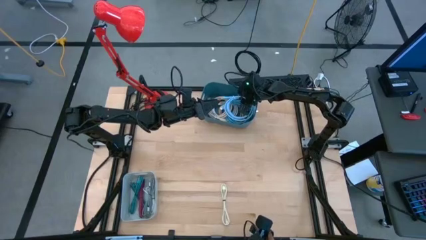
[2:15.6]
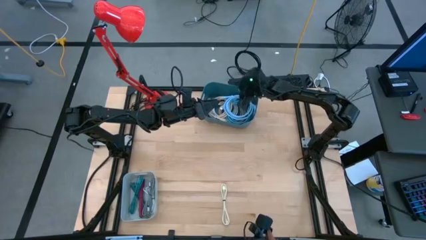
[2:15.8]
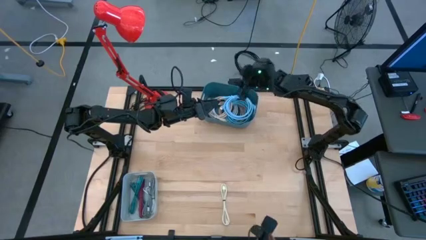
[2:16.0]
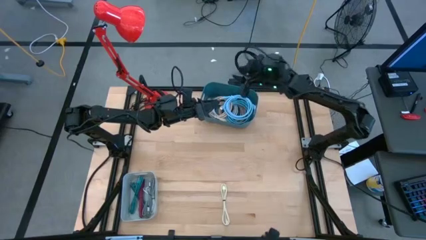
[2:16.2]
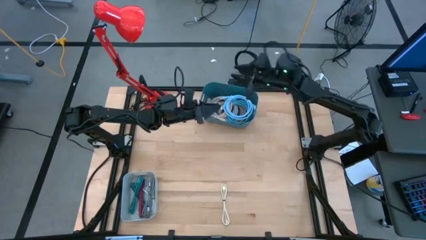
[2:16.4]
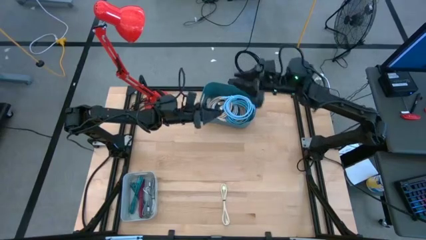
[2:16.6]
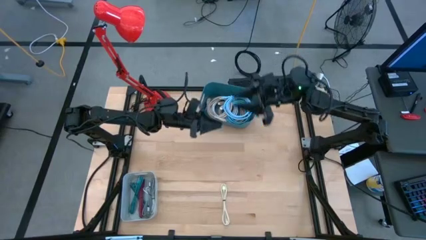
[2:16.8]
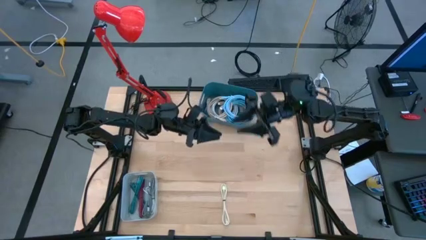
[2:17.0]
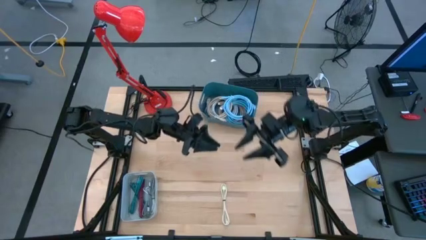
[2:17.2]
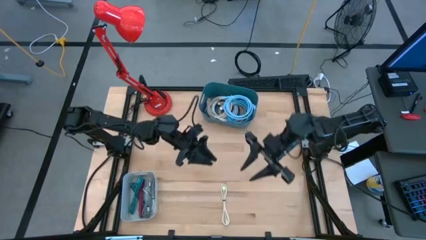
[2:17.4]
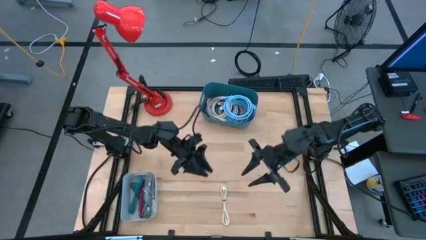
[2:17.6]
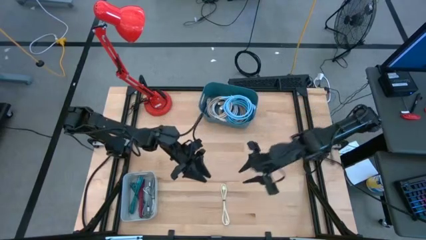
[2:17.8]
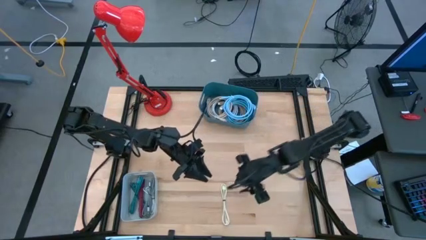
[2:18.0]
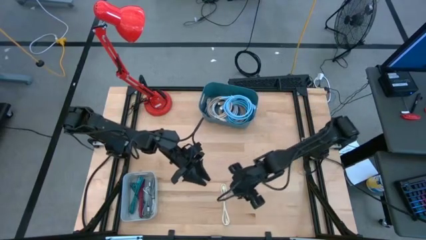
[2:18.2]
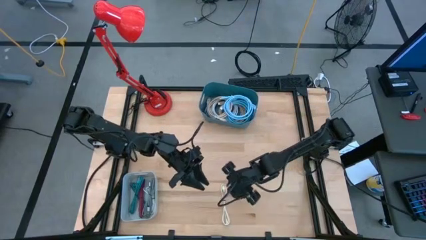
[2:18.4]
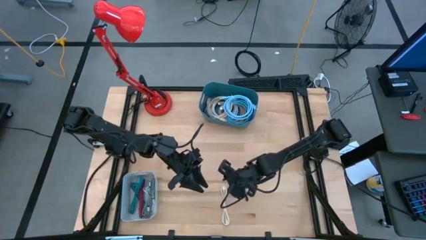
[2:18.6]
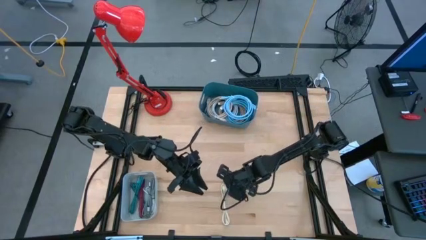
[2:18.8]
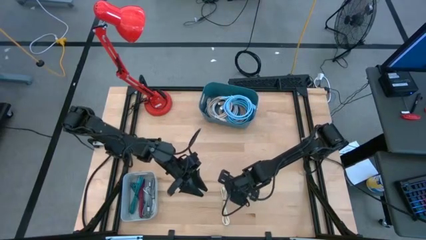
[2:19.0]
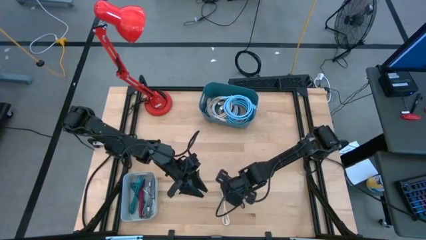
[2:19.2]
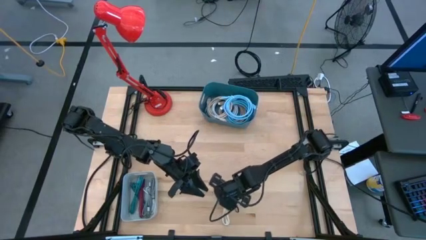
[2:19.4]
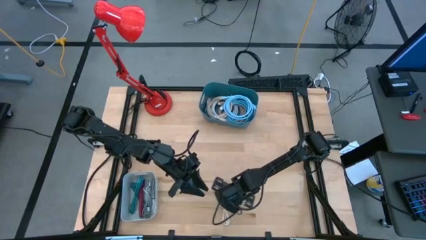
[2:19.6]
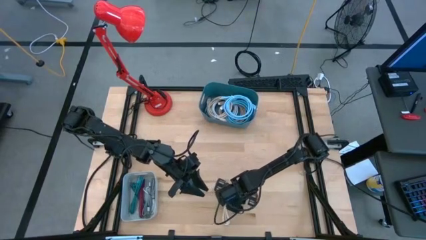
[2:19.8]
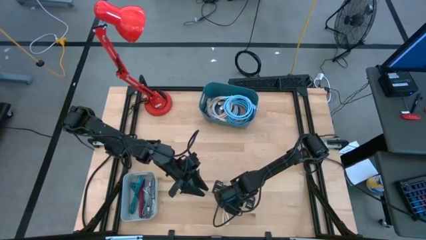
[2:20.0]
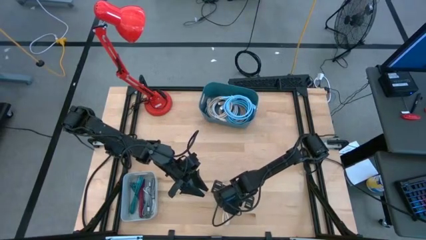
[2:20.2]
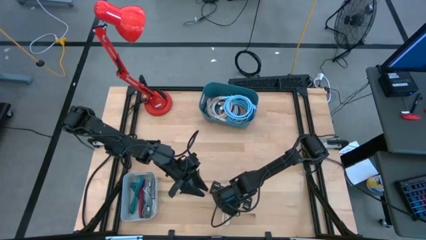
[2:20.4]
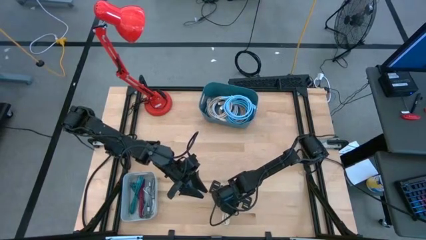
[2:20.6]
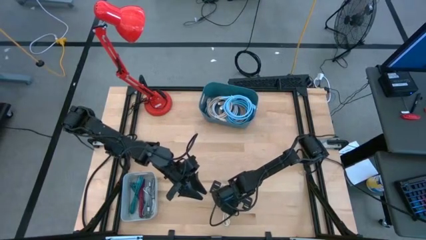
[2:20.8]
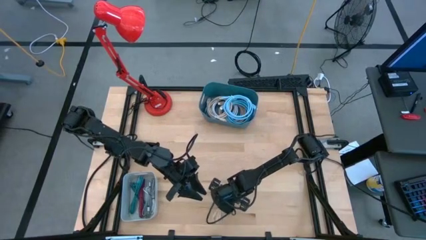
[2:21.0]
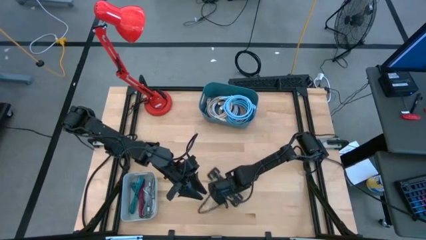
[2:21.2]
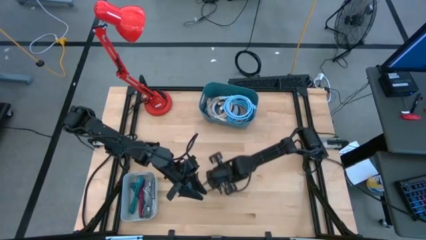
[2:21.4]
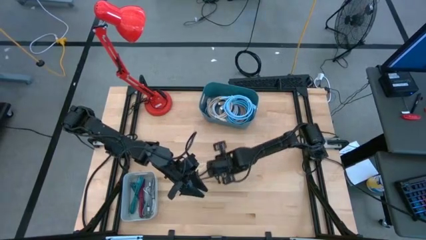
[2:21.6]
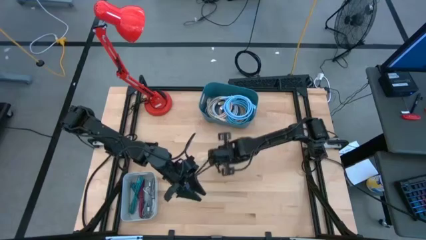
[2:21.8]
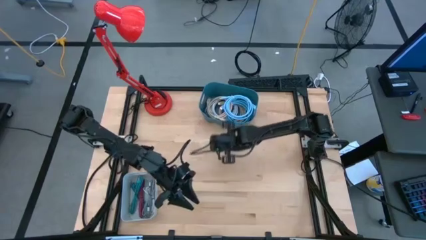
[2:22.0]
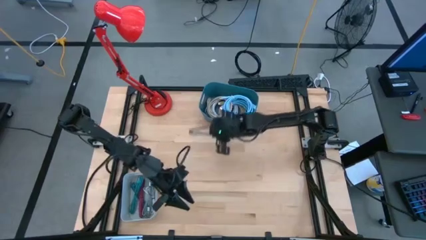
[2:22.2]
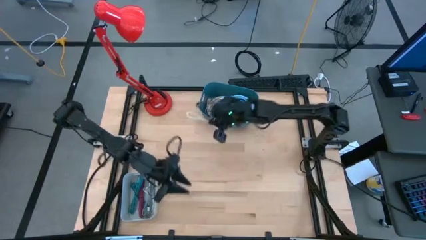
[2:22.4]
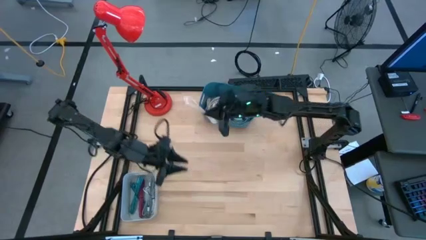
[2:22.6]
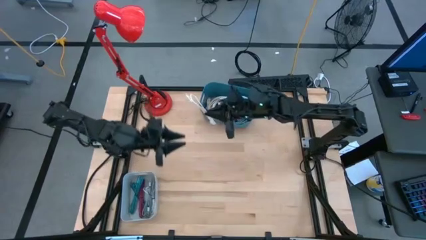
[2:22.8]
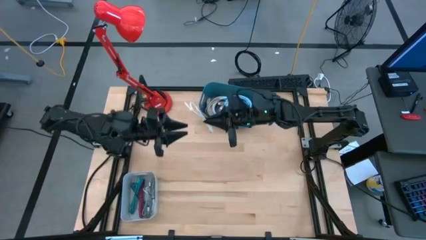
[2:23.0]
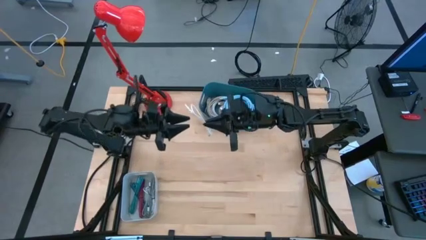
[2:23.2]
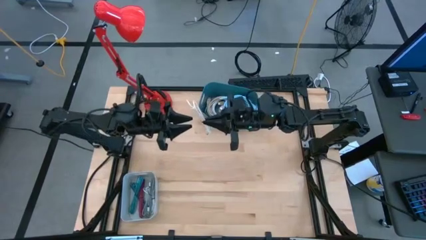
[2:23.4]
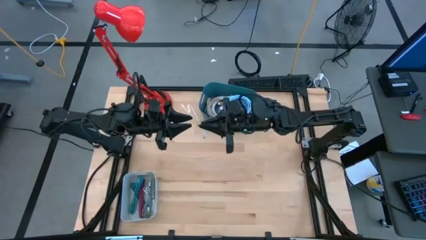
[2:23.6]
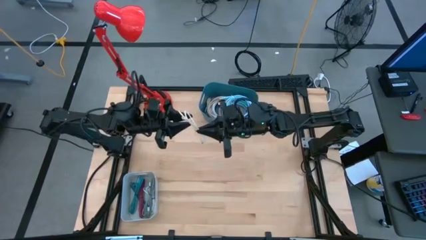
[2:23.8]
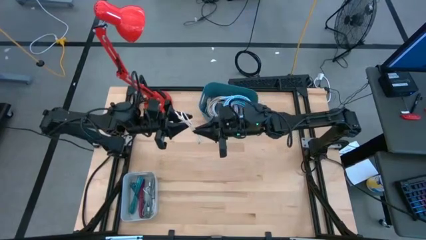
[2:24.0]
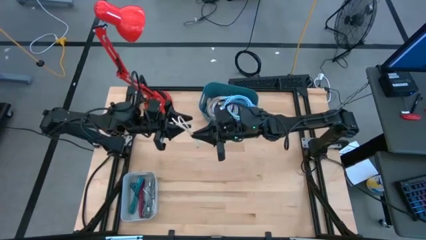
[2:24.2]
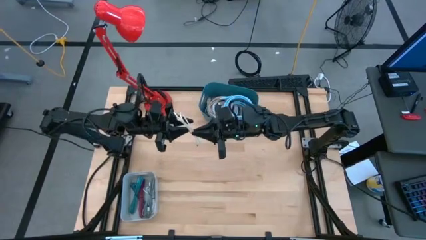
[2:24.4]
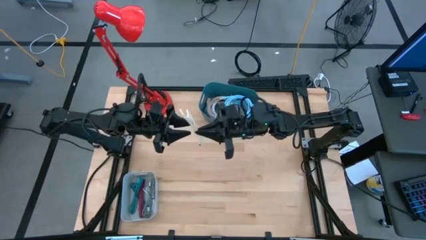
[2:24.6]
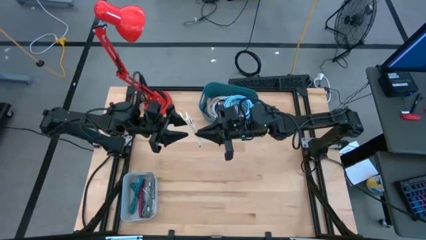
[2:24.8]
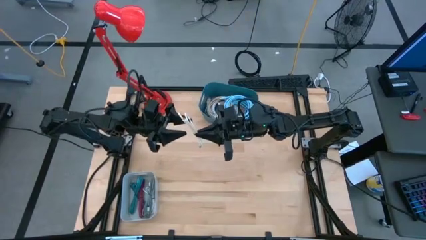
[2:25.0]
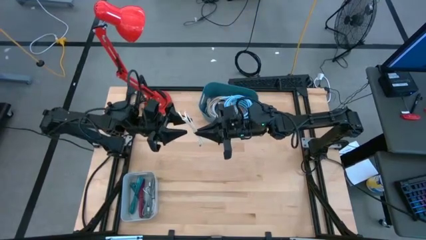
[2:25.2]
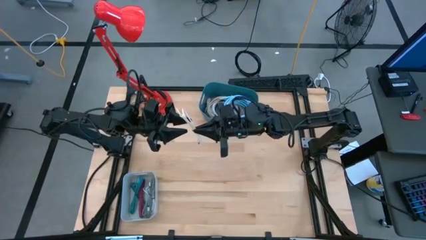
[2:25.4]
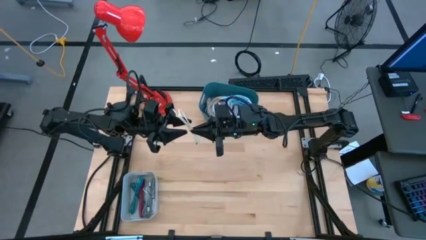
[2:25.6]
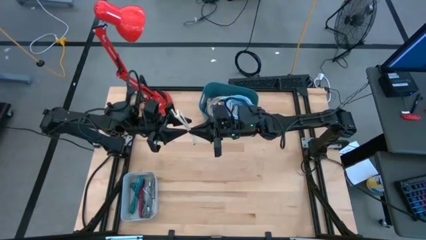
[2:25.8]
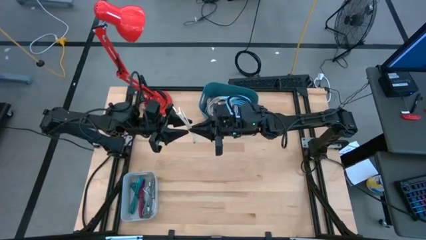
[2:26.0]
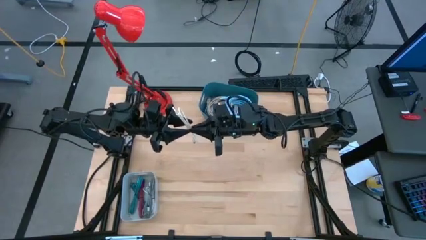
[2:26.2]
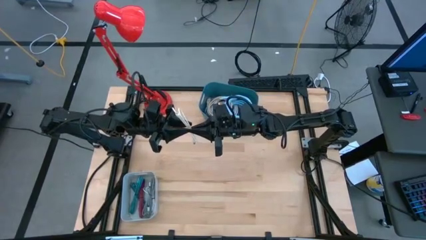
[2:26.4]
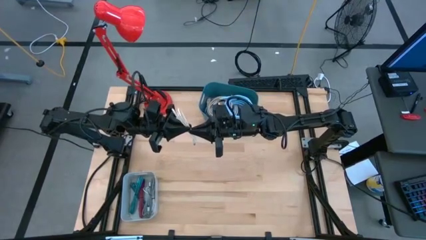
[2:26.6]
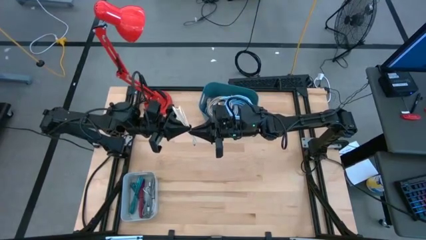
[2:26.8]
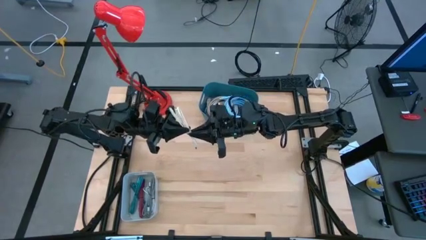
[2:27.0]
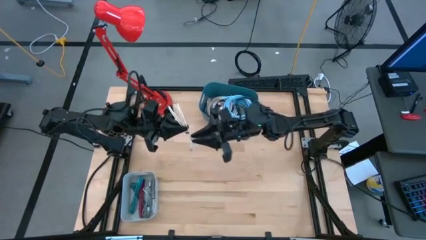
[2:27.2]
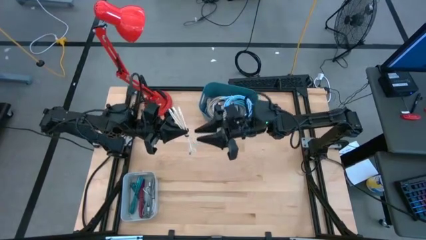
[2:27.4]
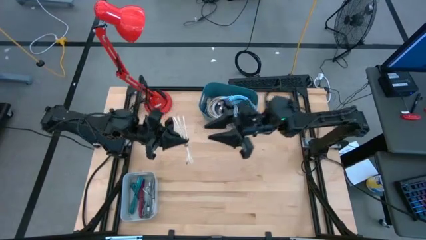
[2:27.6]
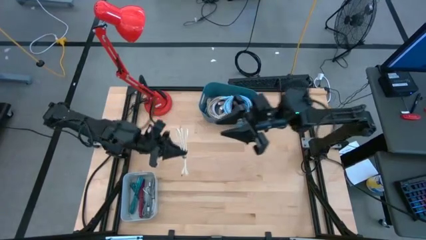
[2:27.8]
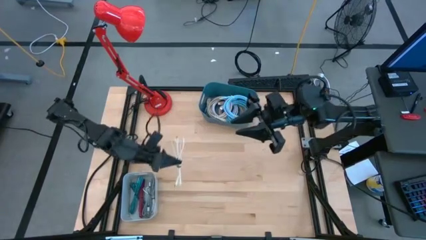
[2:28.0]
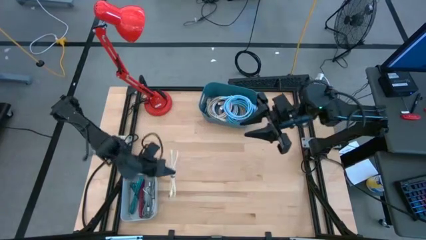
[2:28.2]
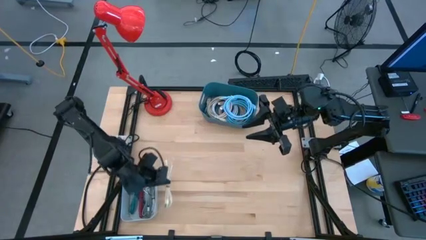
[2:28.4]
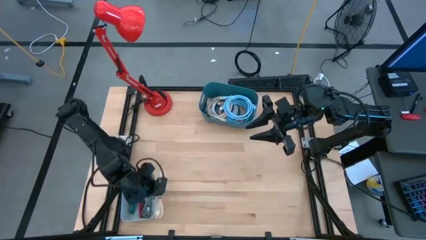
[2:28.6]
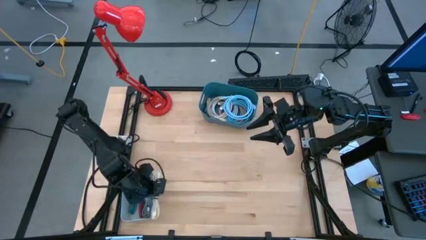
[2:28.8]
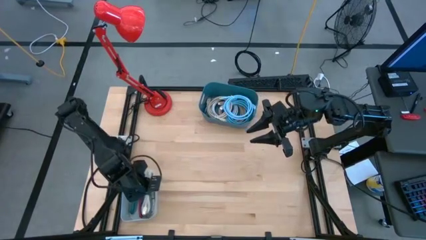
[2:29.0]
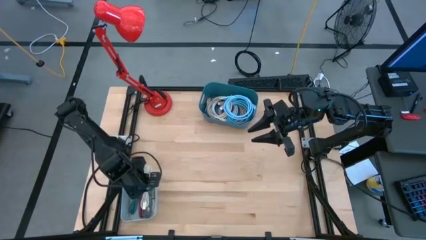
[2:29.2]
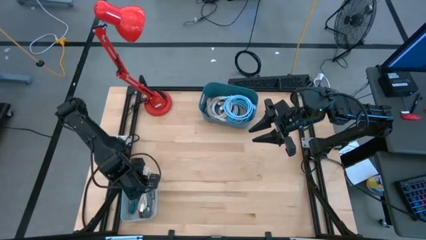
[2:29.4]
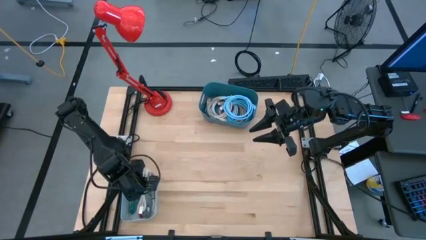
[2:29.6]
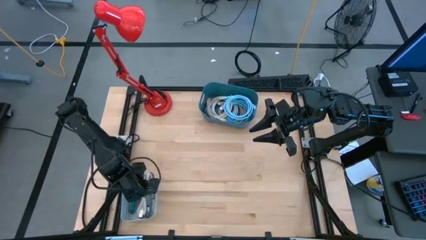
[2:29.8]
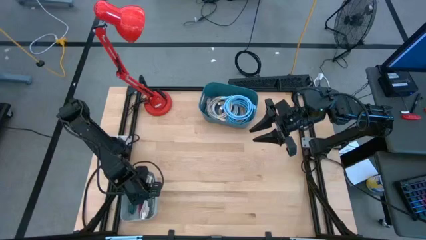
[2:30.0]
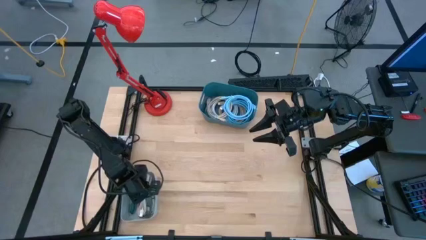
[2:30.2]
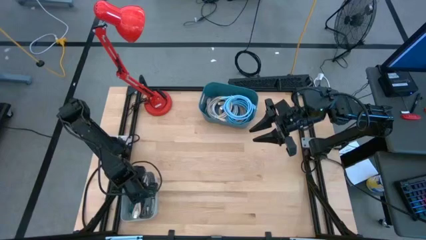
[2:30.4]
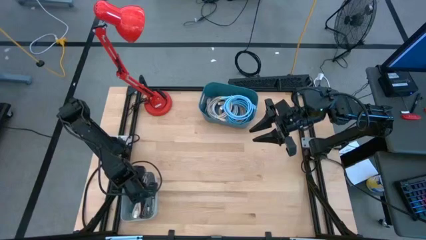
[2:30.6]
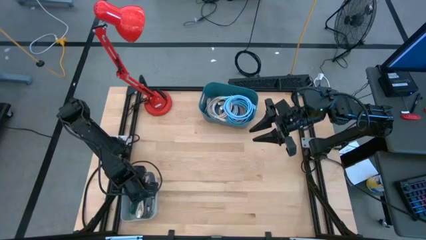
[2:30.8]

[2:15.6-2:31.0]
Task: Pick & Place USB Port
Put the light gray charger cable into the blue bin
